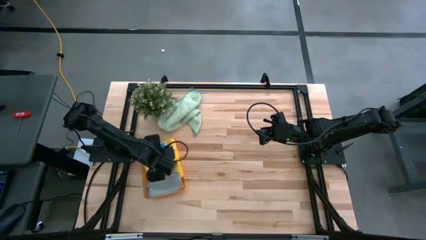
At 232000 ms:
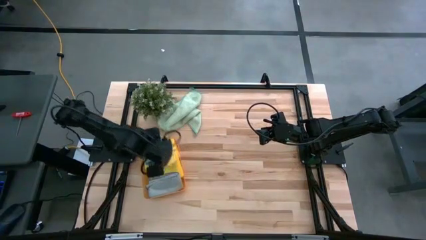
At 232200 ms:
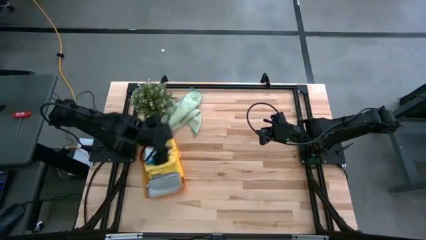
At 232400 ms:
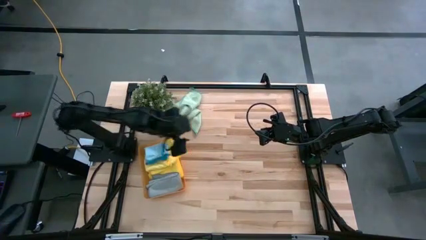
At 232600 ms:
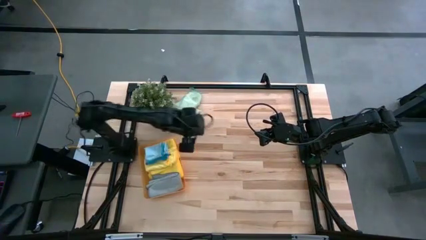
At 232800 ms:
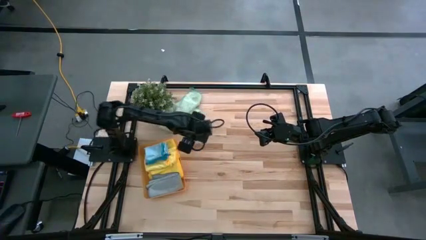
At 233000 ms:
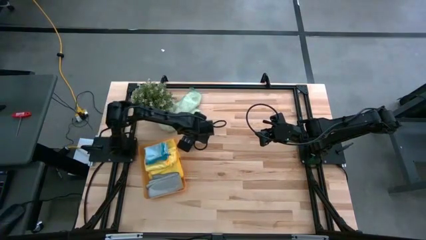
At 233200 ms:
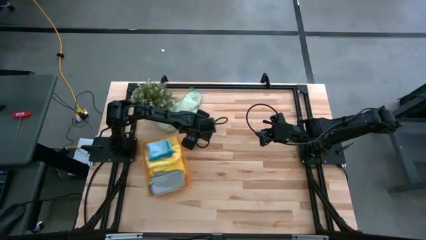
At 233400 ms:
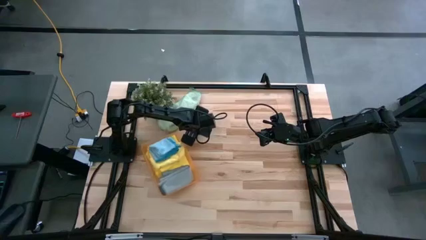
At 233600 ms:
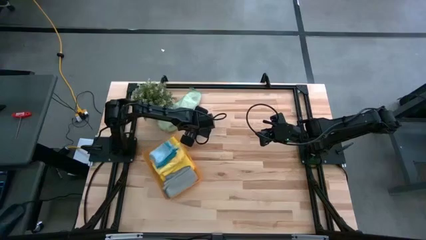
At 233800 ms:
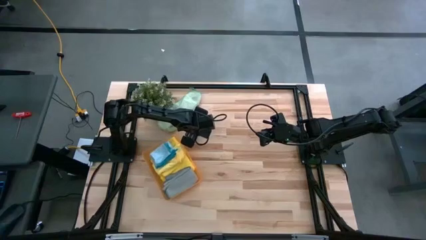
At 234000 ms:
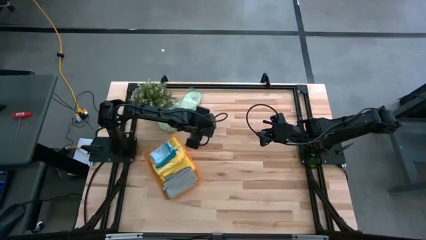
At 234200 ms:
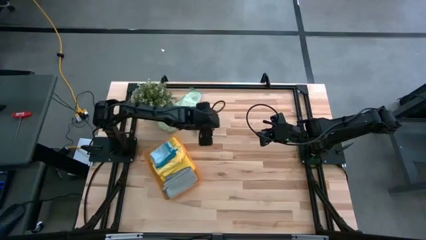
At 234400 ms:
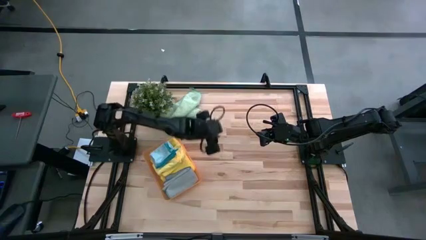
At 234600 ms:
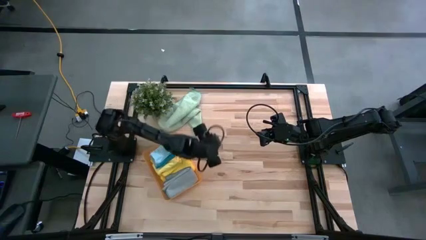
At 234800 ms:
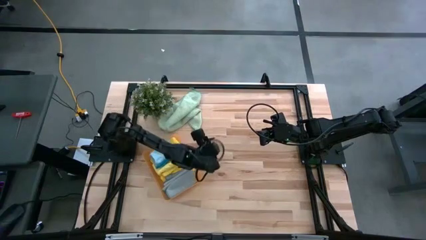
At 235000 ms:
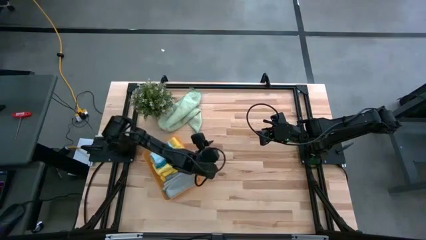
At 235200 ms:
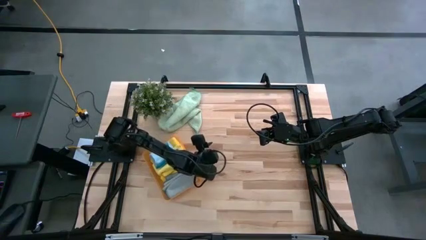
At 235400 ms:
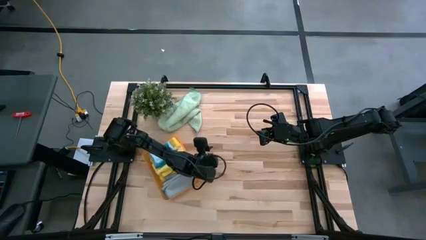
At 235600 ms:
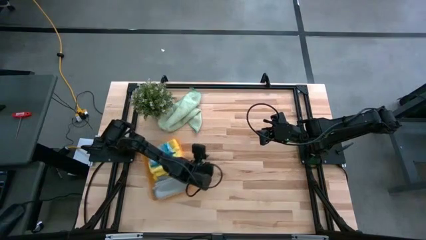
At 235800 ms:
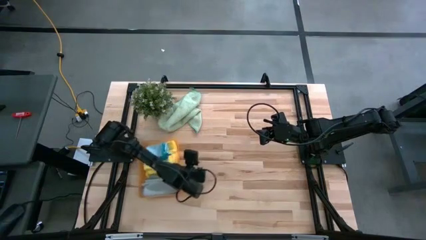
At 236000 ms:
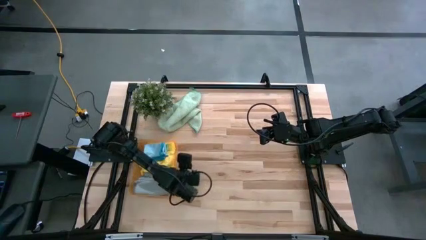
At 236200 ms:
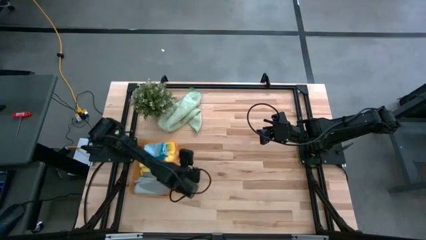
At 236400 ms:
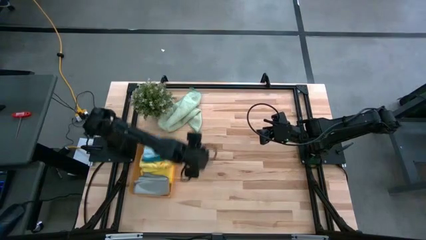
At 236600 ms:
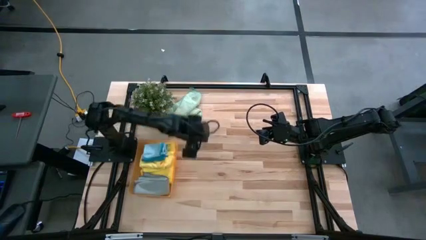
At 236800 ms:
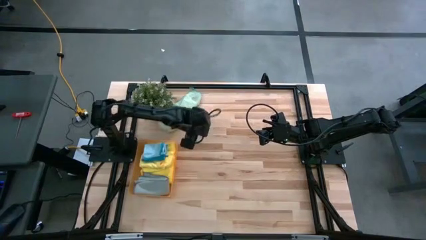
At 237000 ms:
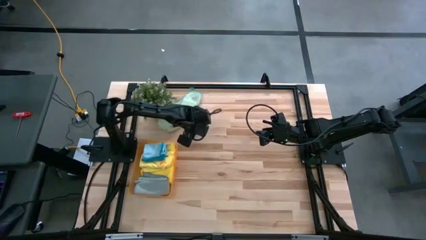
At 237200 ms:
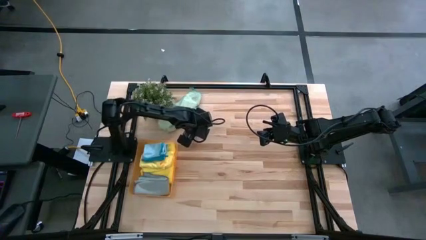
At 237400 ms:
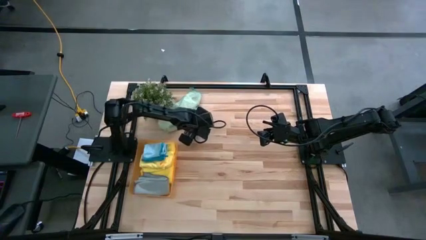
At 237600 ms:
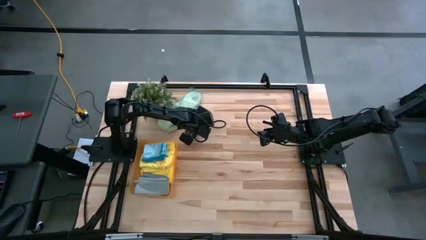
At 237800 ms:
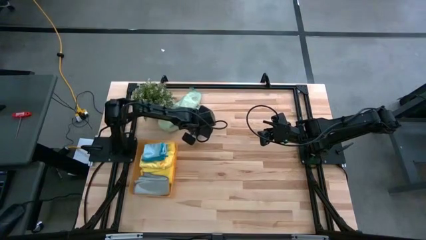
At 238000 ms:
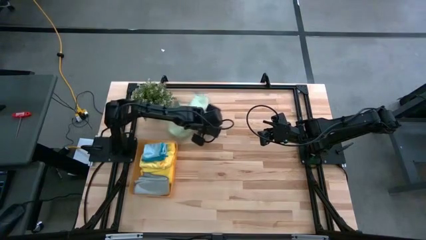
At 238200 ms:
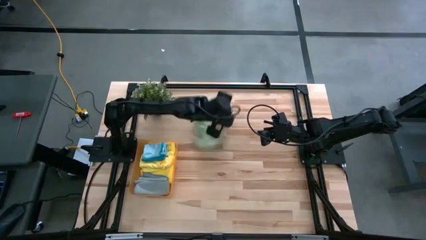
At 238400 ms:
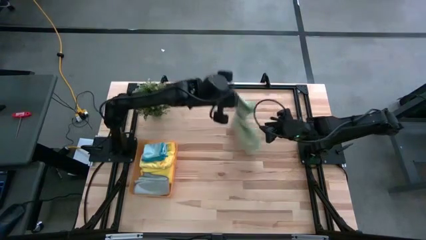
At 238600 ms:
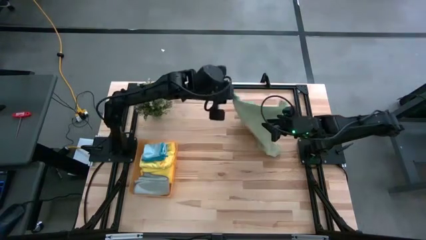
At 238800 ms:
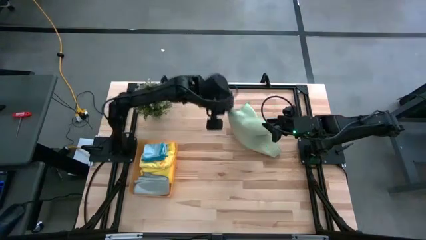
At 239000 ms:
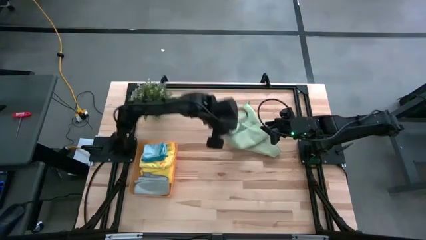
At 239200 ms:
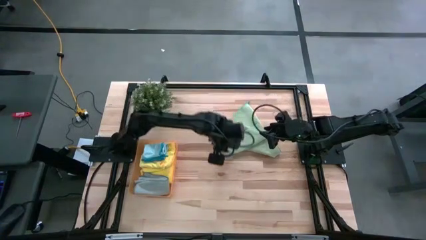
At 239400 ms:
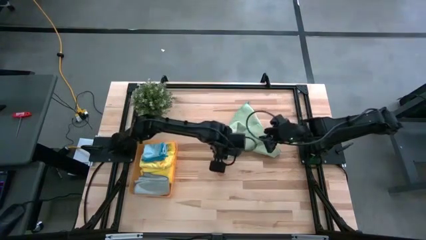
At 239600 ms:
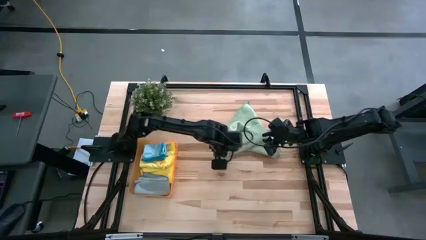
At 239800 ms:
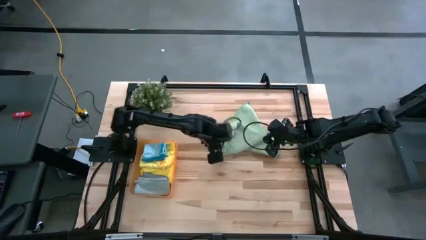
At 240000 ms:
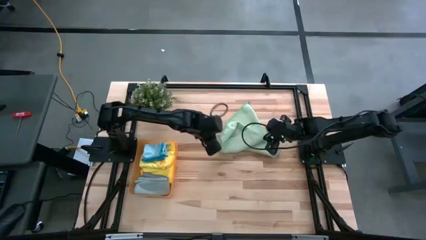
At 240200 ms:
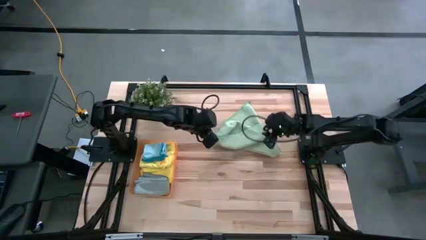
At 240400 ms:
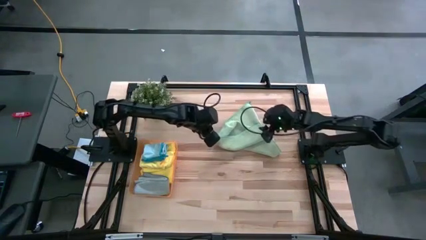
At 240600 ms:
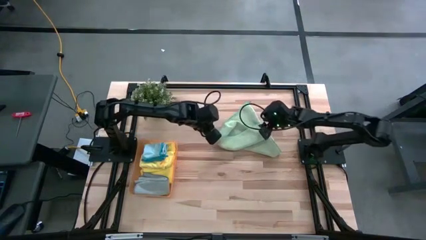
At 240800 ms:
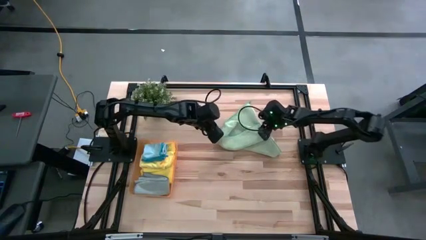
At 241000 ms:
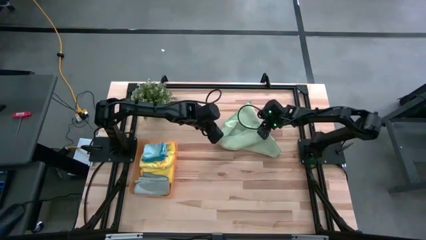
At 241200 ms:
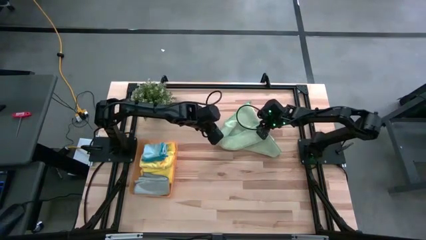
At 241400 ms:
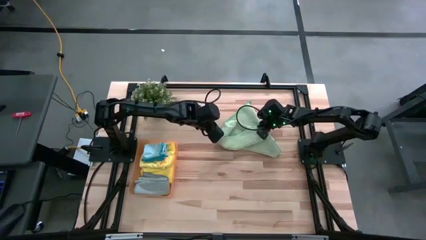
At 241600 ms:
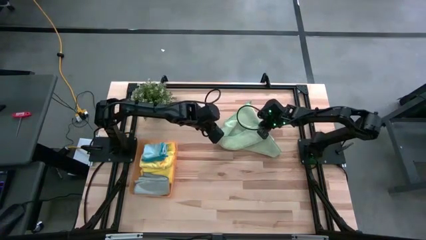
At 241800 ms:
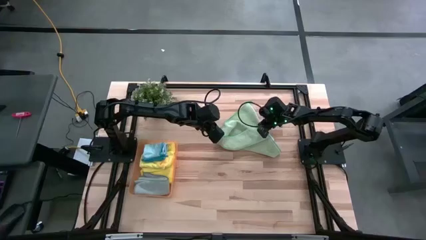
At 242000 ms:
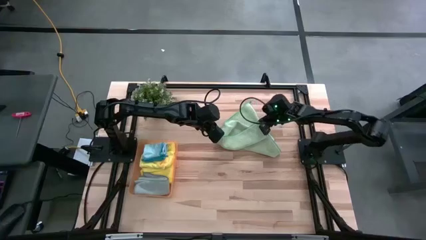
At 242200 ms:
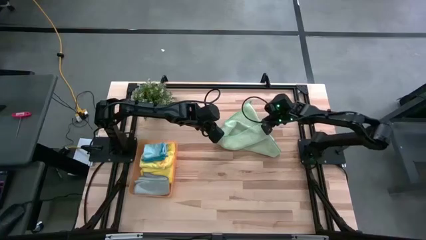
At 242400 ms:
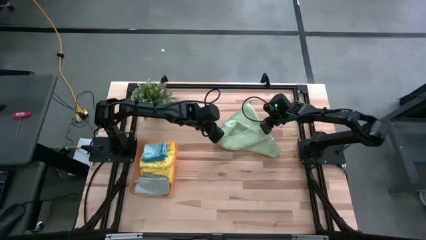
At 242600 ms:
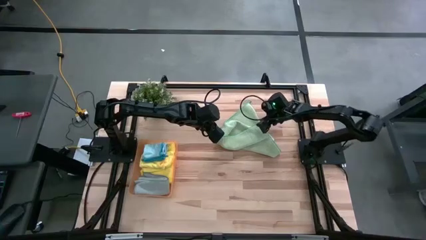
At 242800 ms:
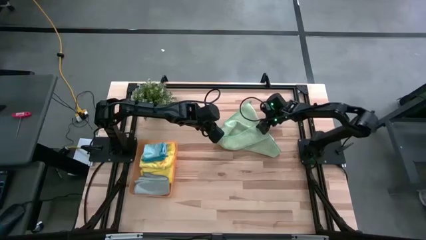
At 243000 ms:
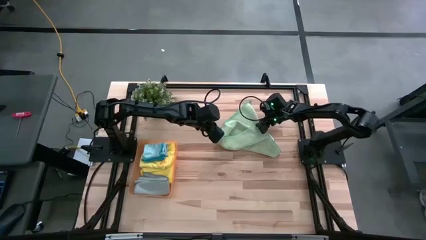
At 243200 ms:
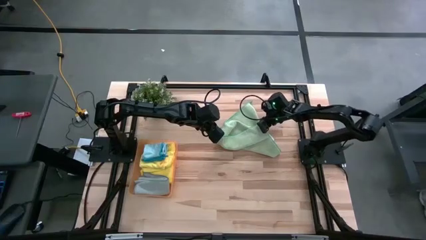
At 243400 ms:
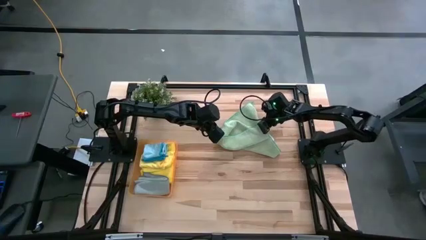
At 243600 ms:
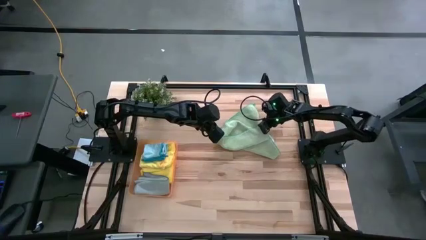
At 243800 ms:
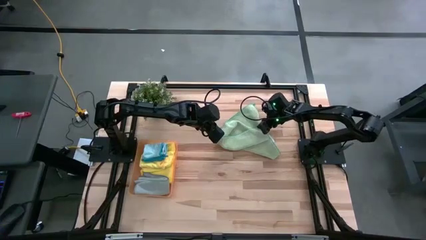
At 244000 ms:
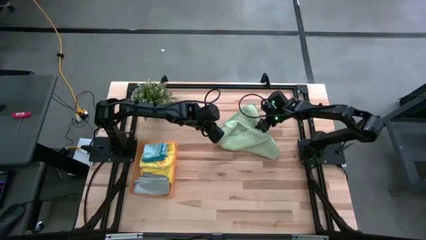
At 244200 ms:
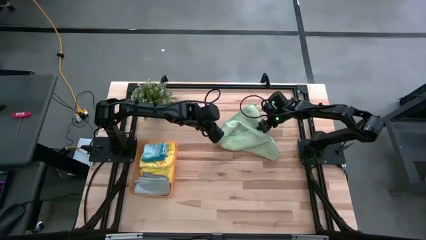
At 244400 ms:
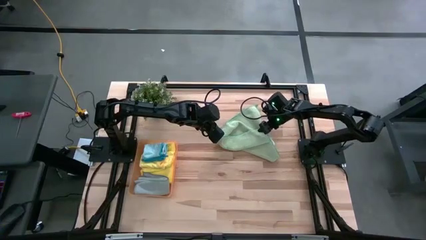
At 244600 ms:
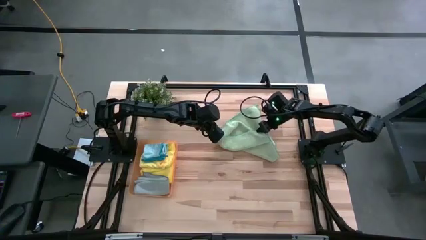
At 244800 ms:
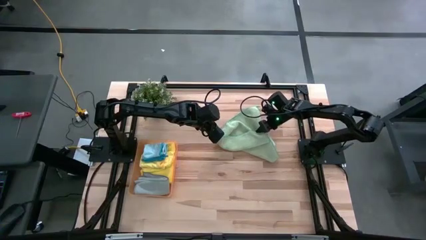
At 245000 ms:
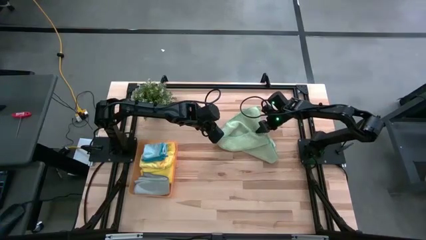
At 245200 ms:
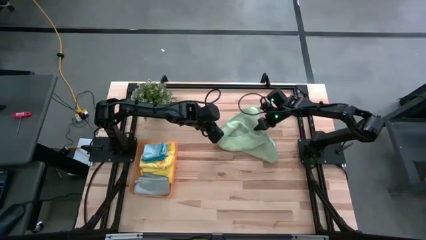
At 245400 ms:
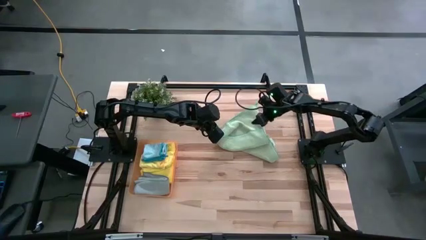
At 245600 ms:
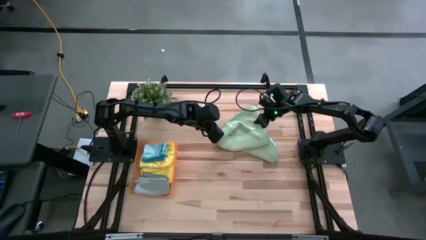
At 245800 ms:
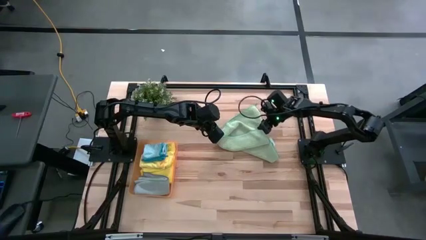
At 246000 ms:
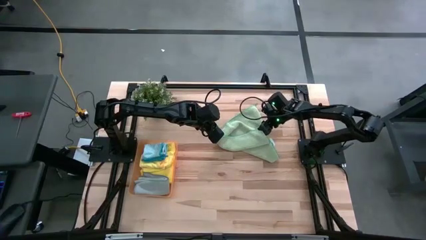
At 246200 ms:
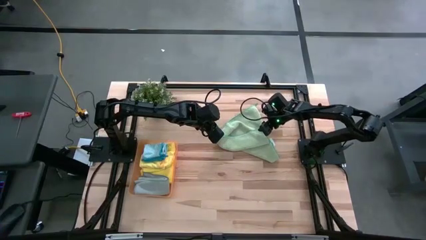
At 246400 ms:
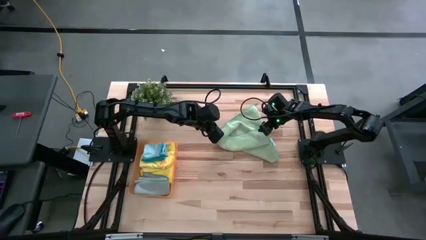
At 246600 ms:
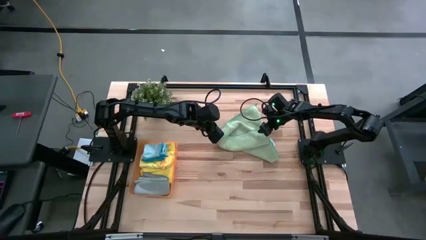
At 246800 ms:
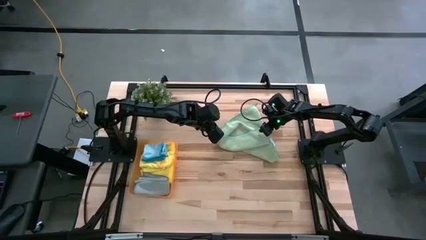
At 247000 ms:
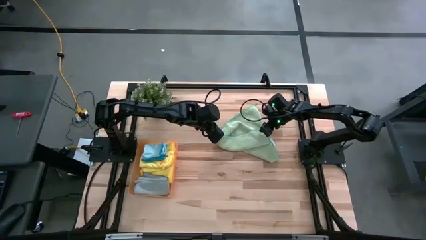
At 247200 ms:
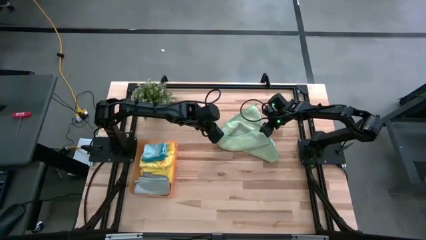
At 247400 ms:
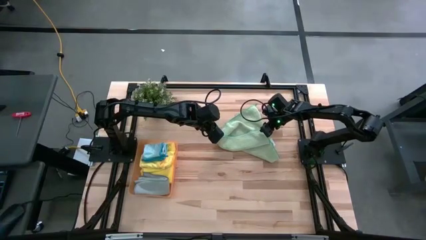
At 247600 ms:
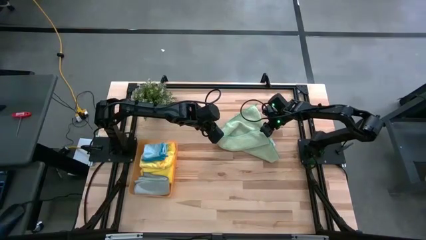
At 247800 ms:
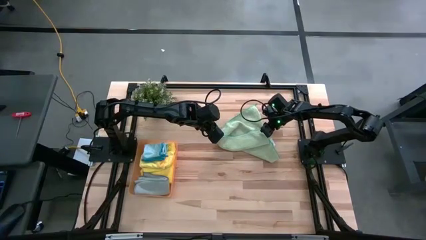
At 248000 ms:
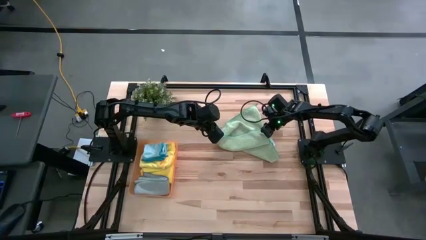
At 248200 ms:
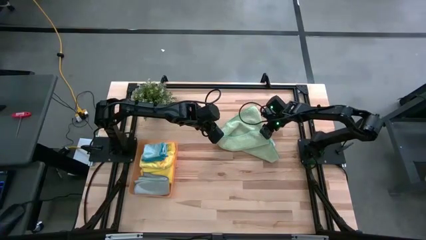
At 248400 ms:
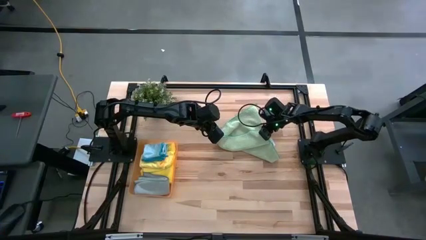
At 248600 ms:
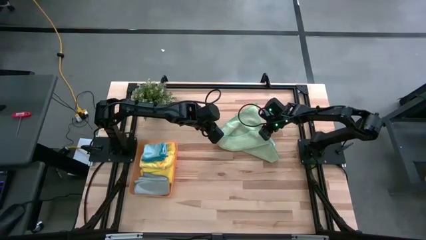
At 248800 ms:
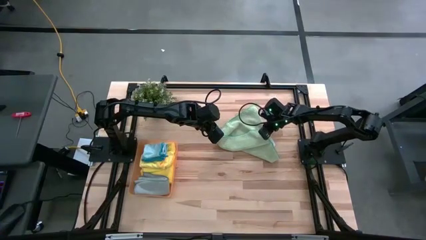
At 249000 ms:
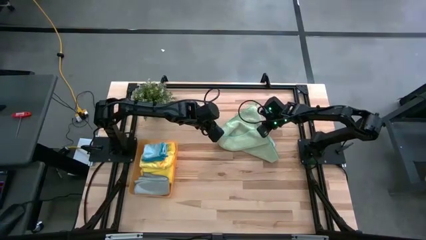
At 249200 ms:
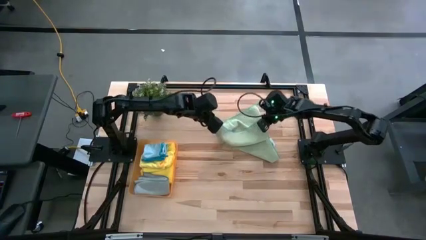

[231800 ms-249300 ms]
Task: Fold microfiber towels
Fold the green microfiber towel
